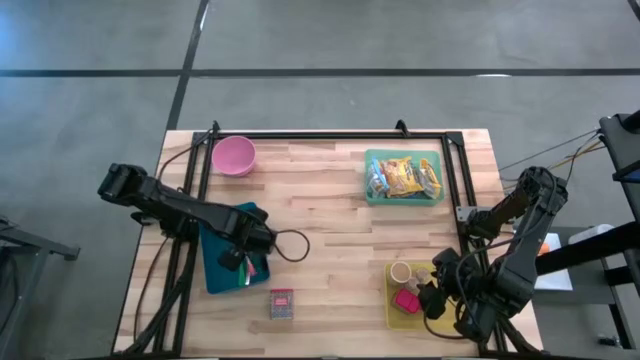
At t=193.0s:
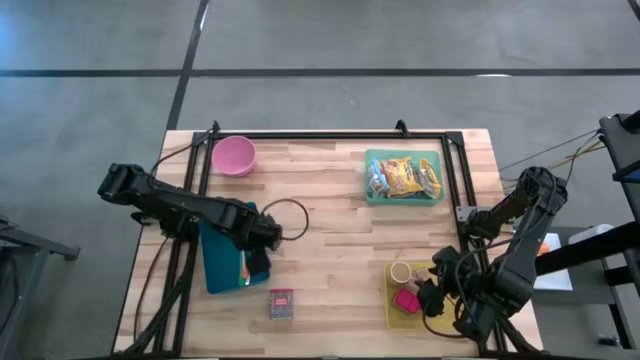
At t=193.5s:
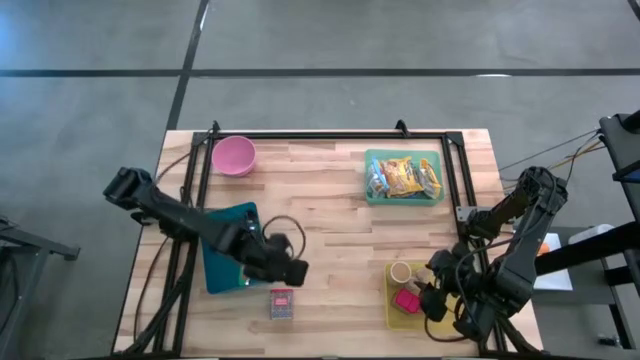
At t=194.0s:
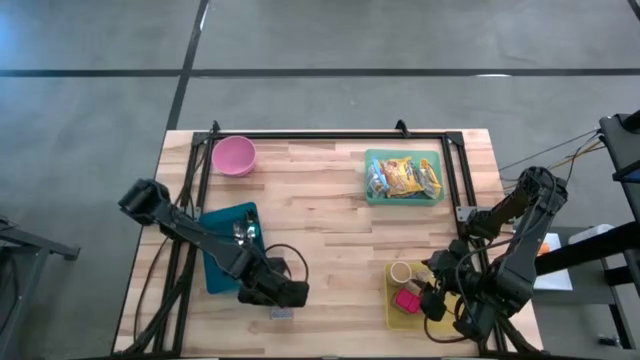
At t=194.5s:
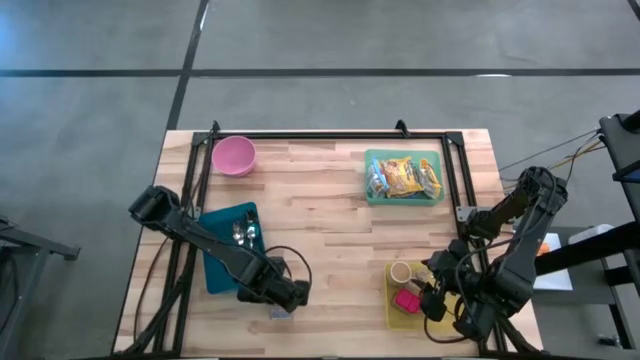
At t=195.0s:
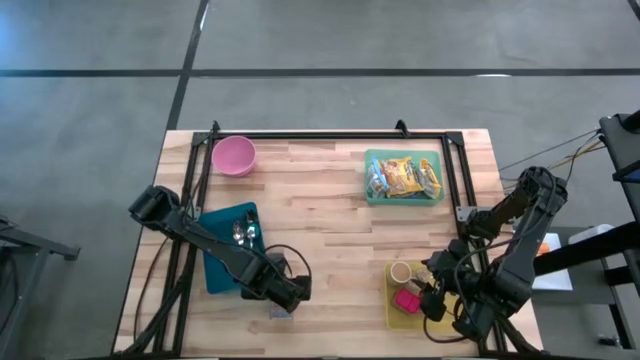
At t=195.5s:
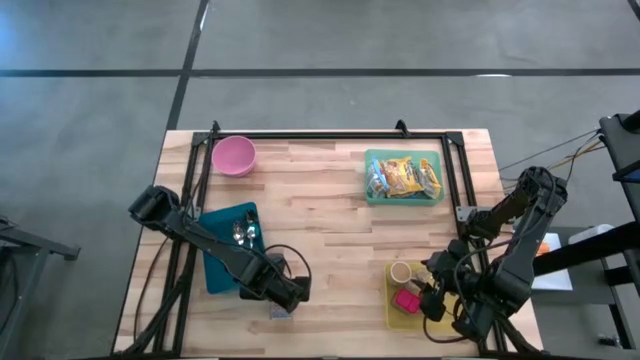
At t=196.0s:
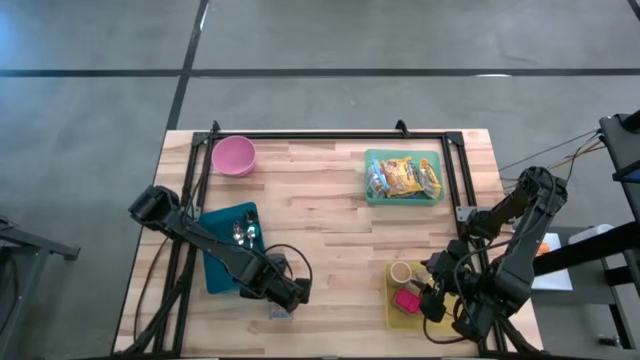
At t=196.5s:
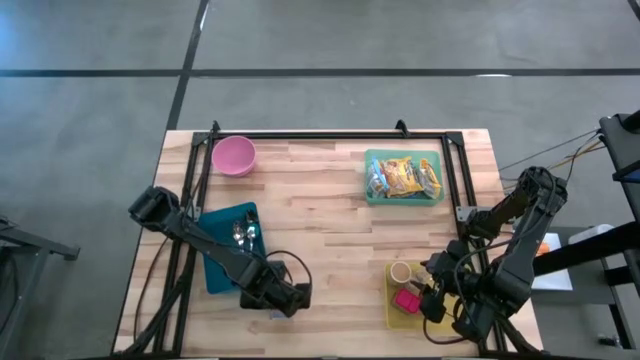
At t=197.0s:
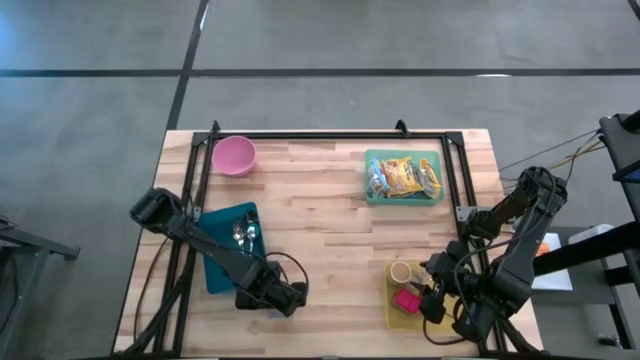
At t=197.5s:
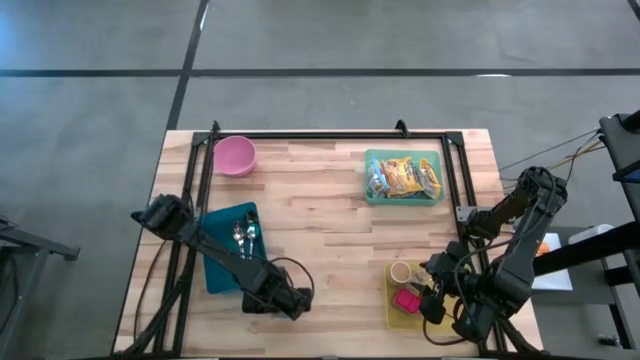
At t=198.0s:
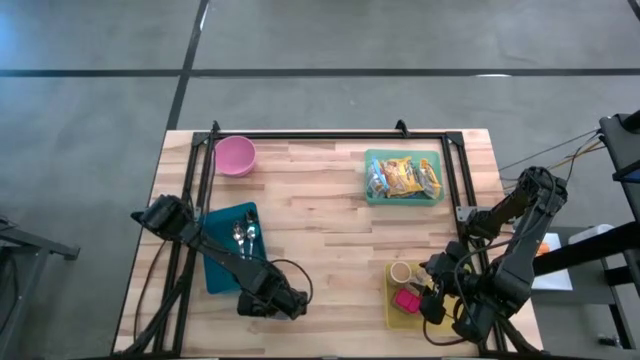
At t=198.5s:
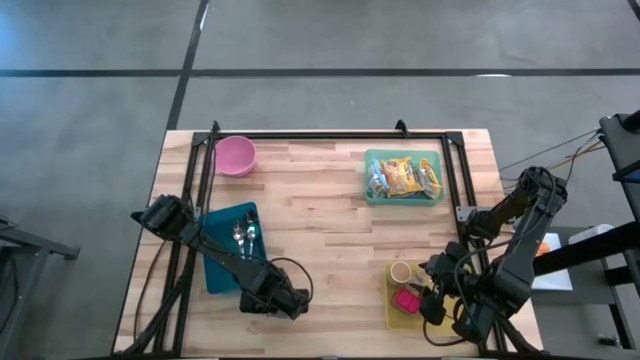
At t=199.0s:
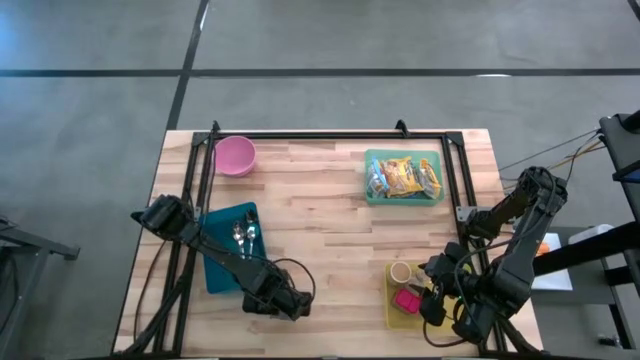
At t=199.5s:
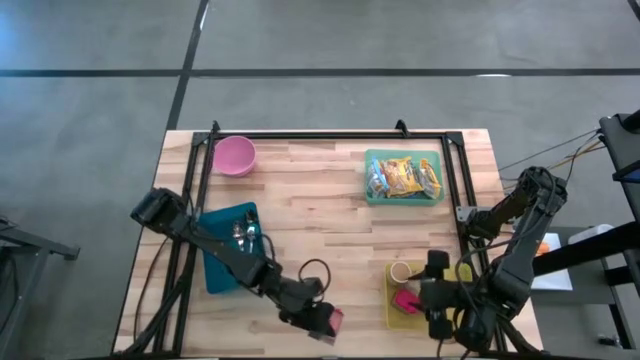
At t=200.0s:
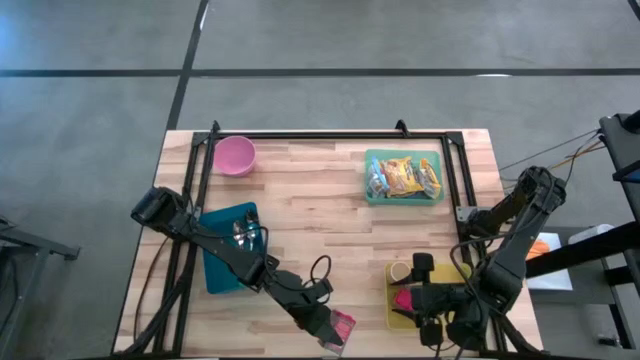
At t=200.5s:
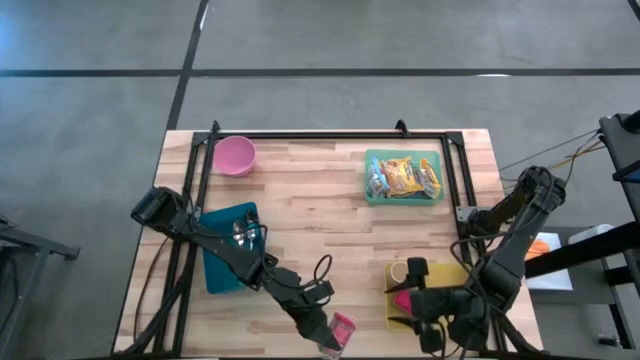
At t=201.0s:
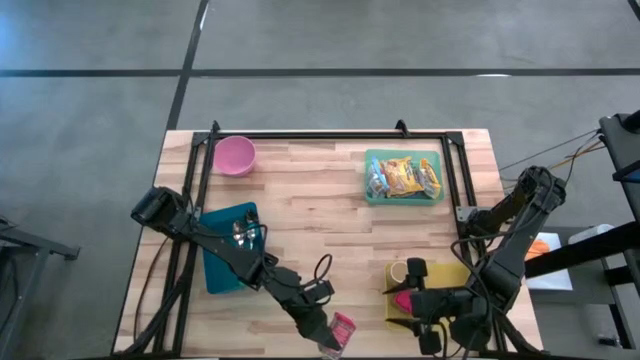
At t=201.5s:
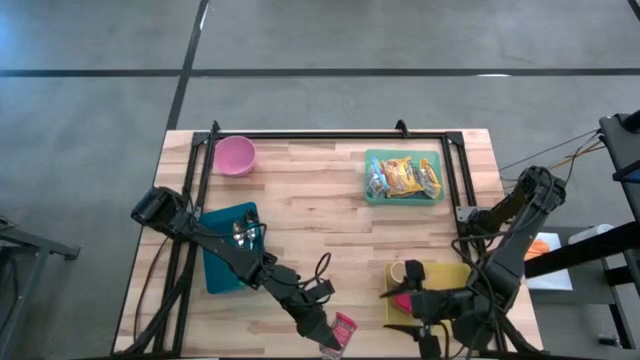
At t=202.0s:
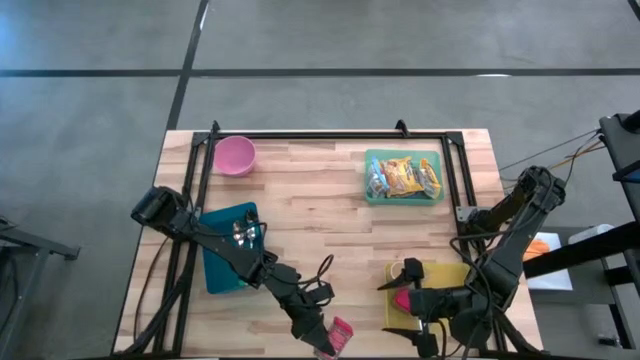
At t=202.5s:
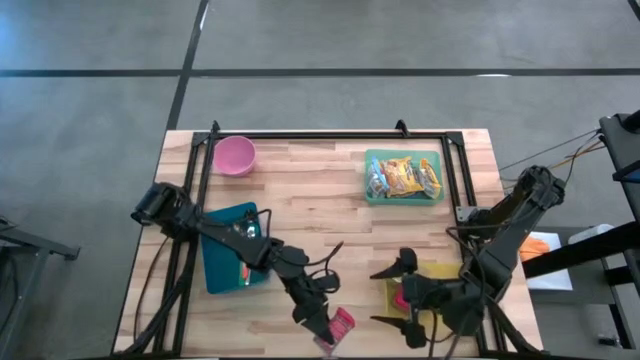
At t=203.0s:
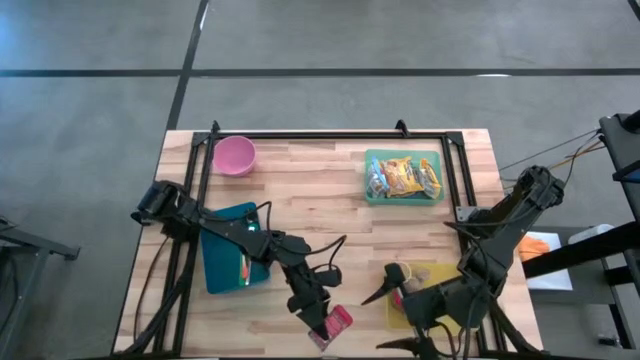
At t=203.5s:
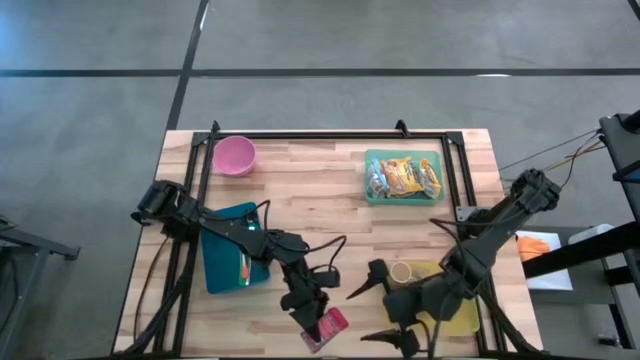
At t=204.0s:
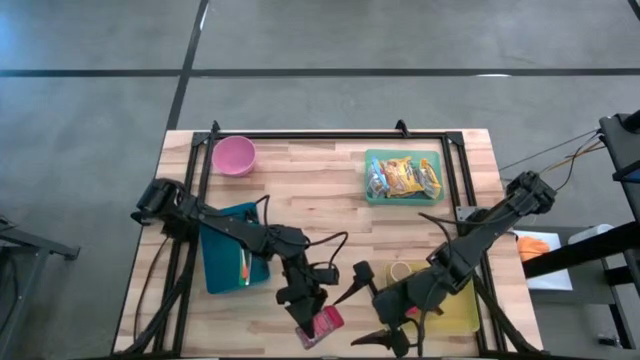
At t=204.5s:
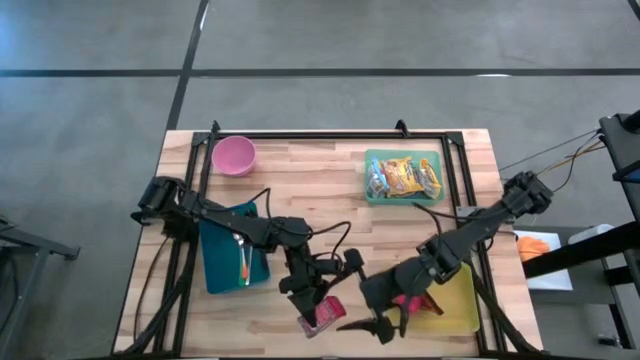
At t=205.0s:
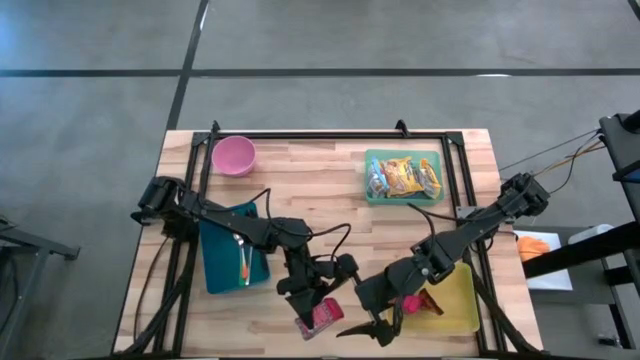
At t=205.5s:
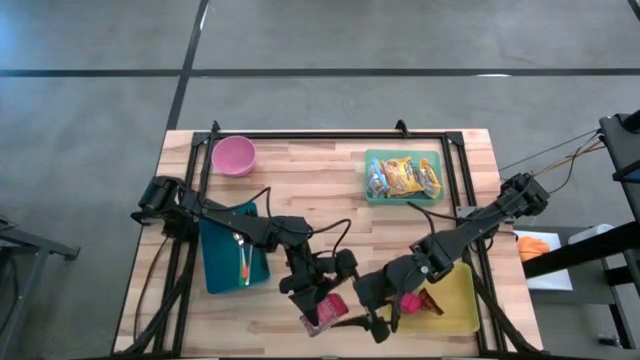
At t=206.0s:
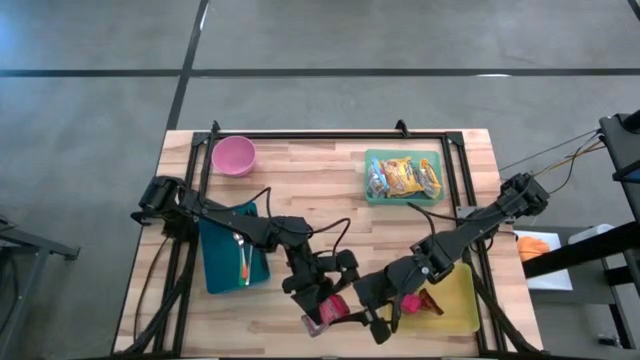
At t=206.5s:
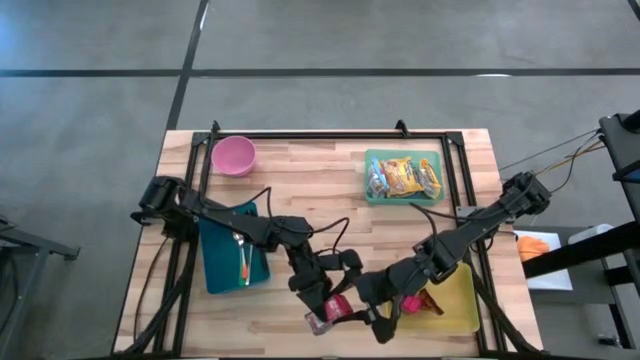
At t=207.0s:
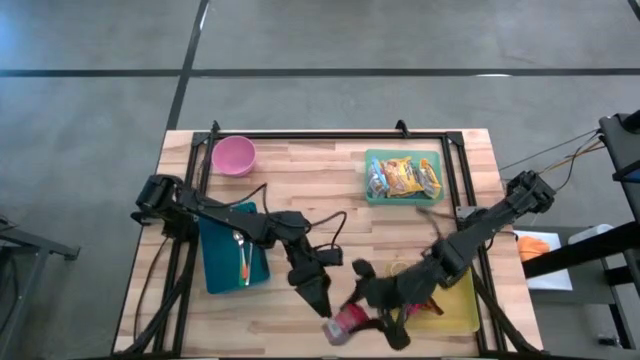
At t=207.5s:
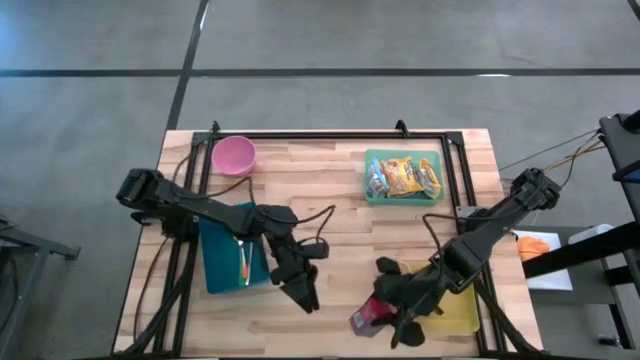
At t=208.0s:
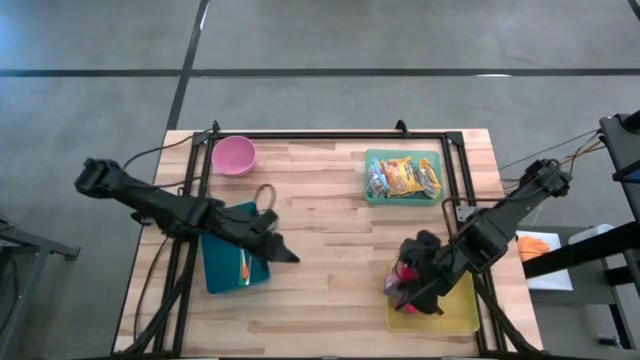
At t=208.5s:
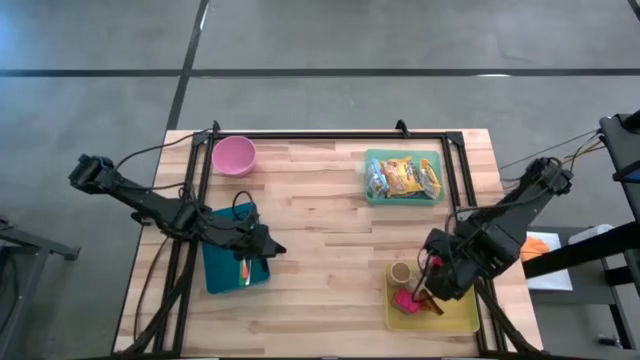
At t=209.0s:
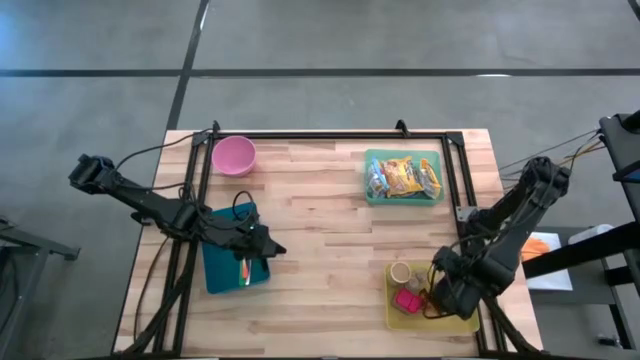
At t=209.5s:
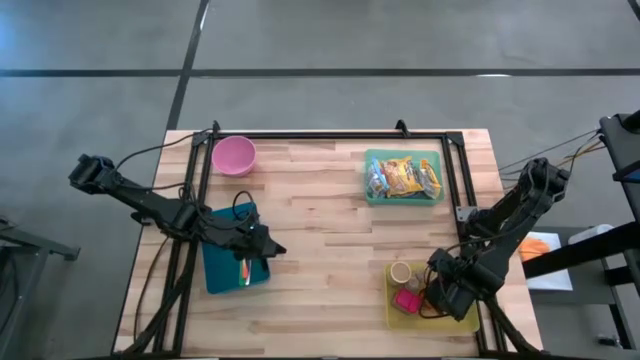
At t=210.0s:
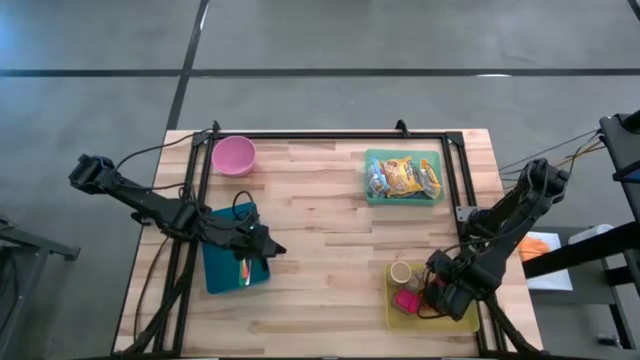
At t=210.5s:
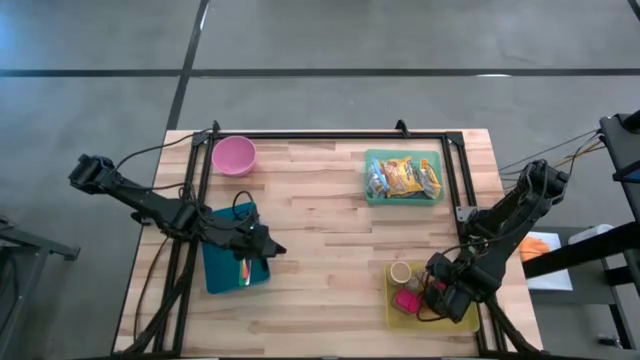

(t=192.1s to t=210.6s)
Put the red spice can into the yellow bin
